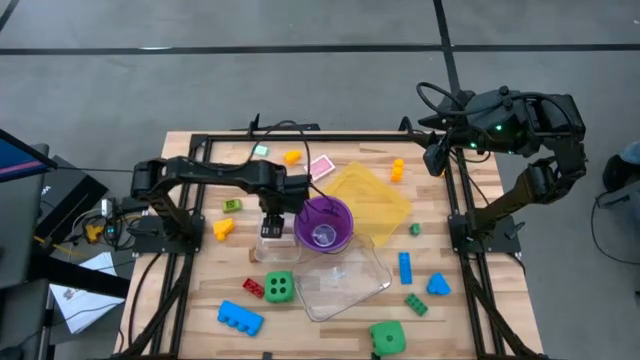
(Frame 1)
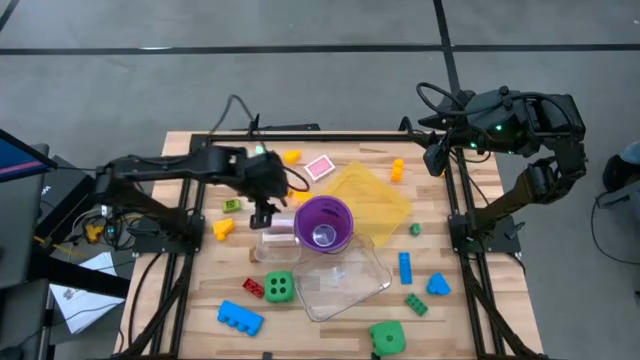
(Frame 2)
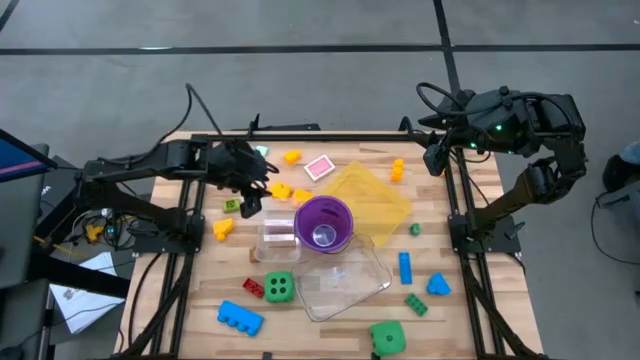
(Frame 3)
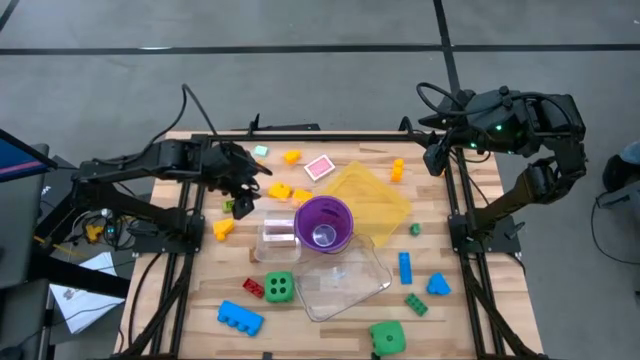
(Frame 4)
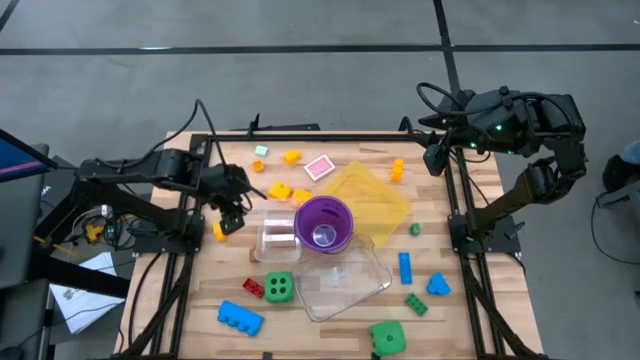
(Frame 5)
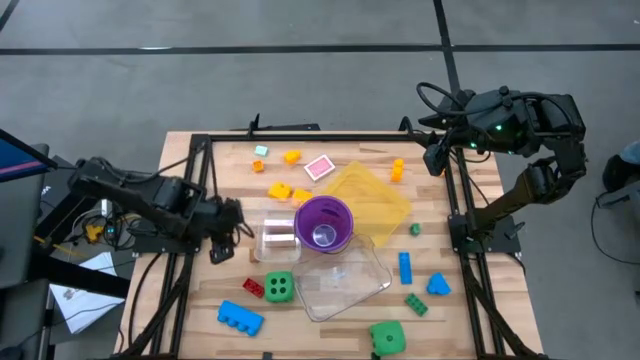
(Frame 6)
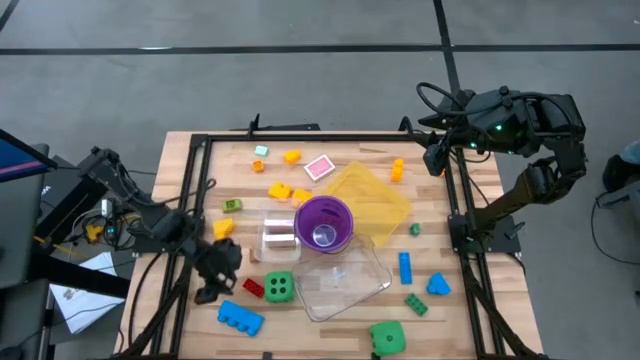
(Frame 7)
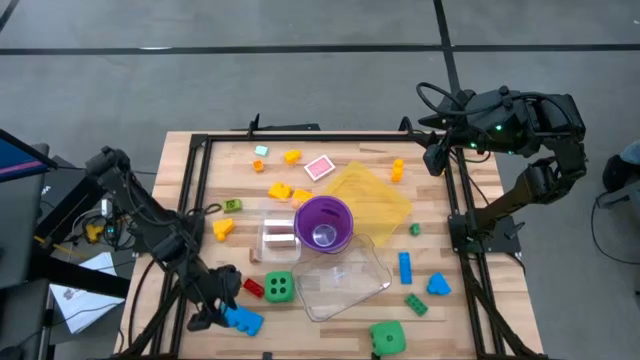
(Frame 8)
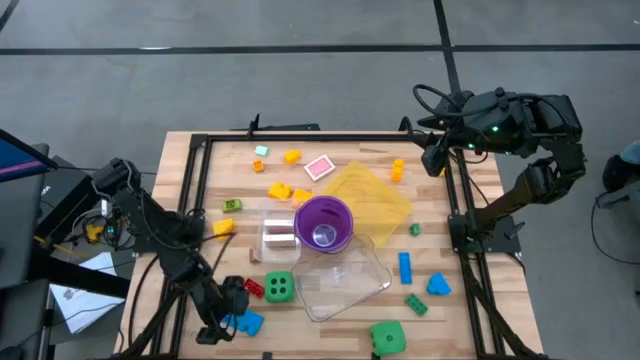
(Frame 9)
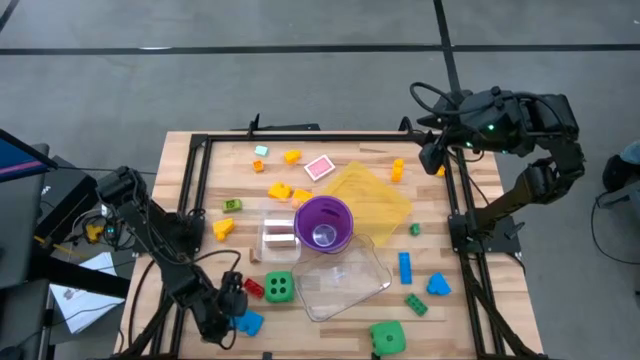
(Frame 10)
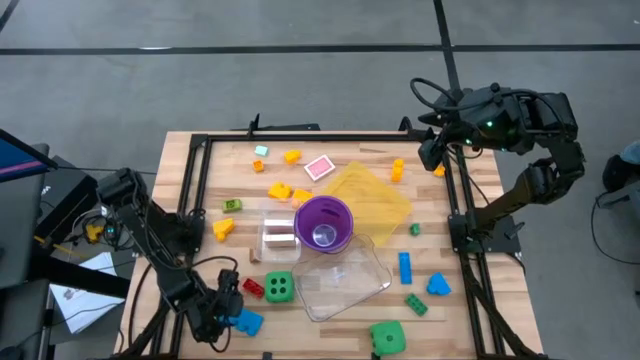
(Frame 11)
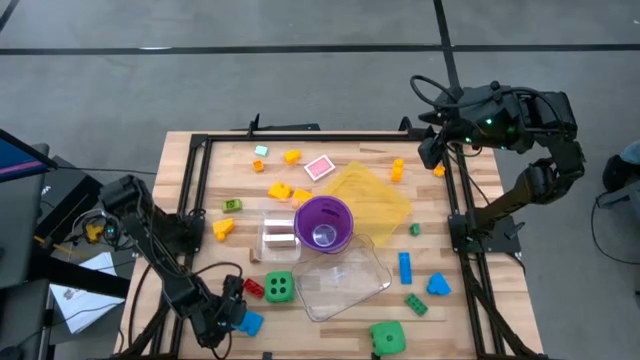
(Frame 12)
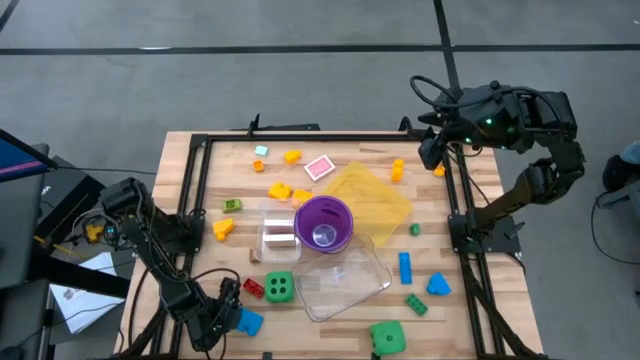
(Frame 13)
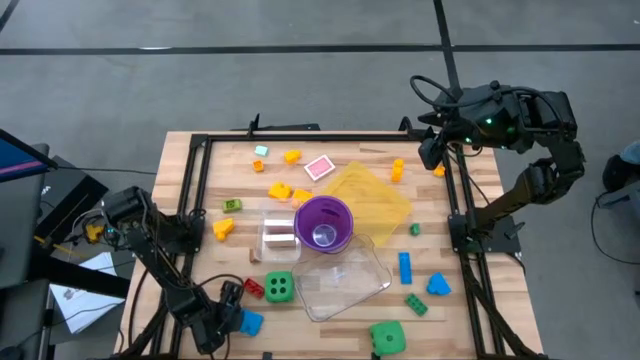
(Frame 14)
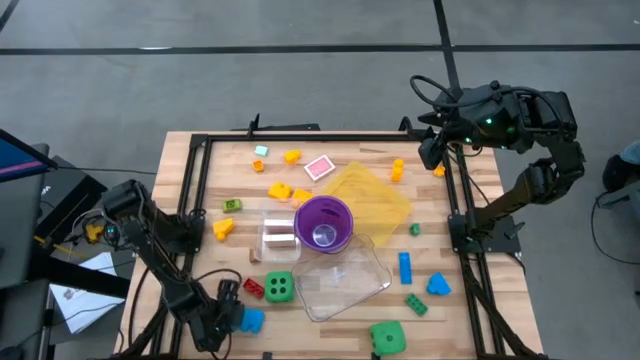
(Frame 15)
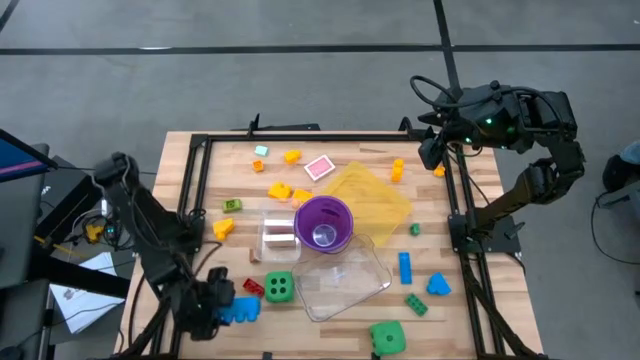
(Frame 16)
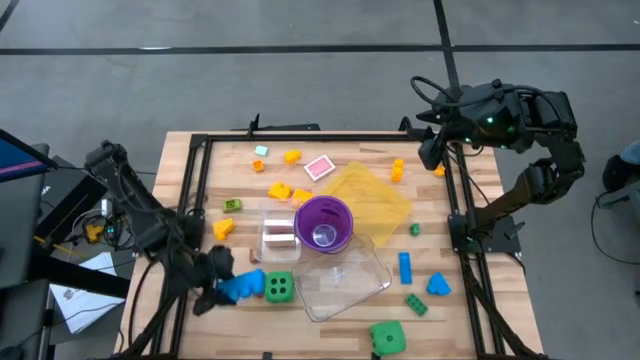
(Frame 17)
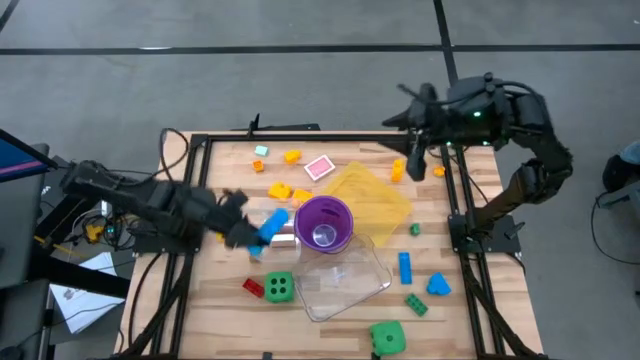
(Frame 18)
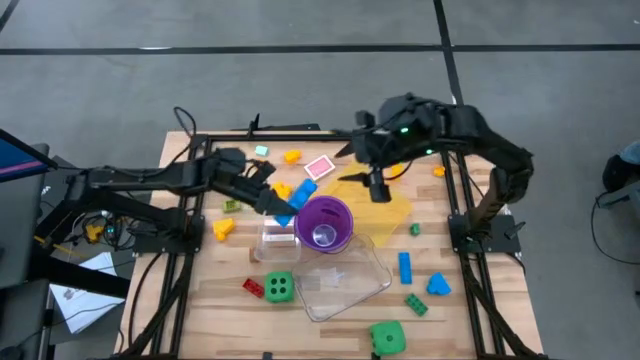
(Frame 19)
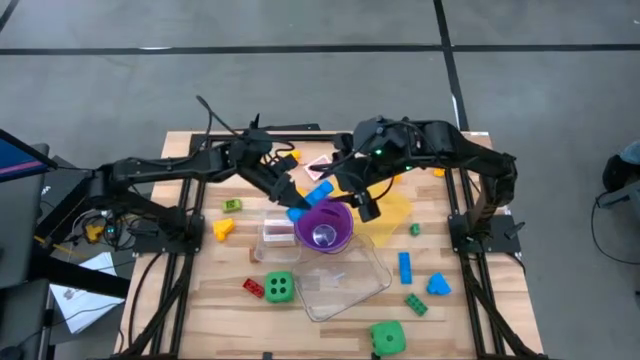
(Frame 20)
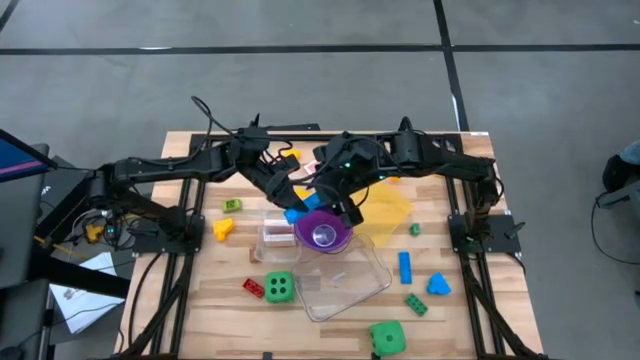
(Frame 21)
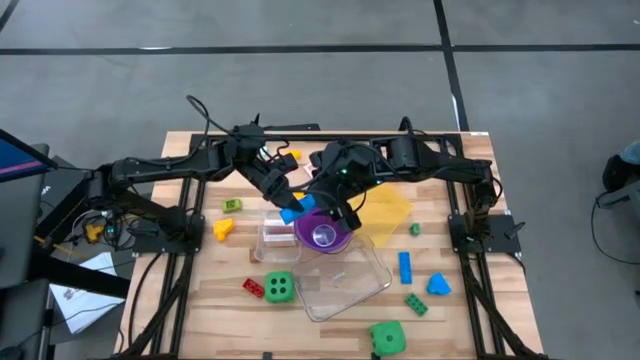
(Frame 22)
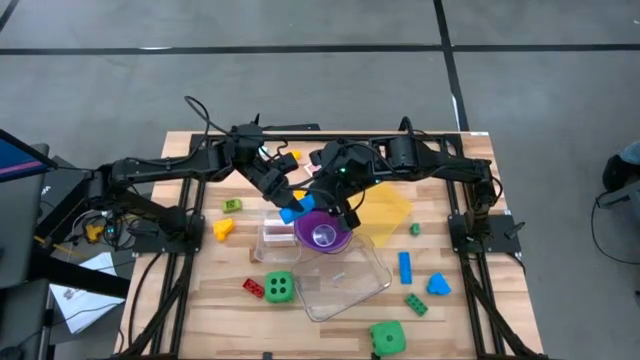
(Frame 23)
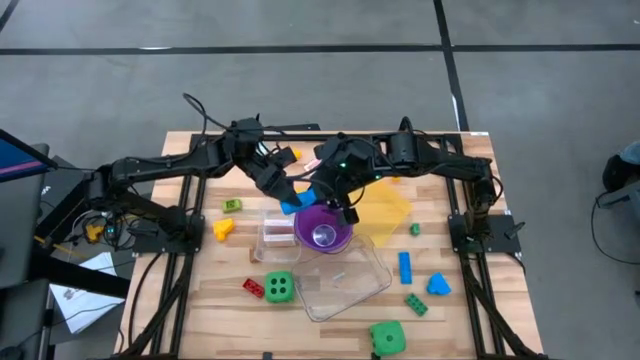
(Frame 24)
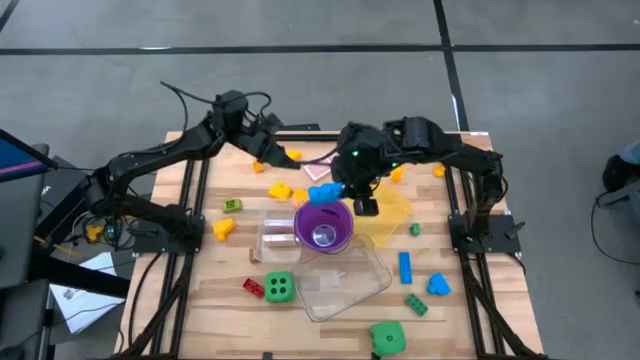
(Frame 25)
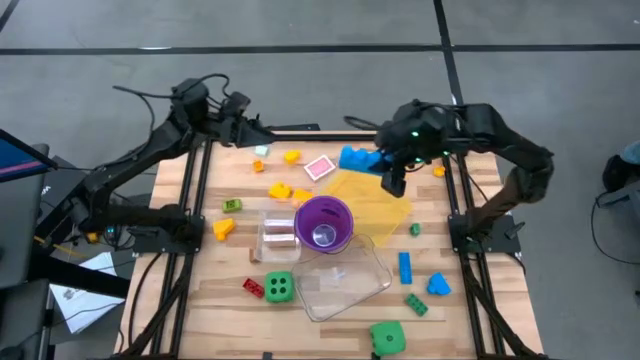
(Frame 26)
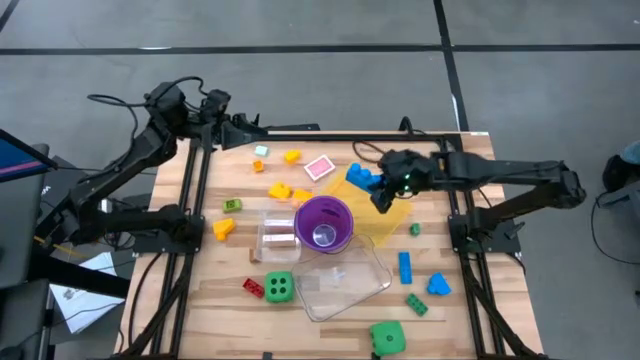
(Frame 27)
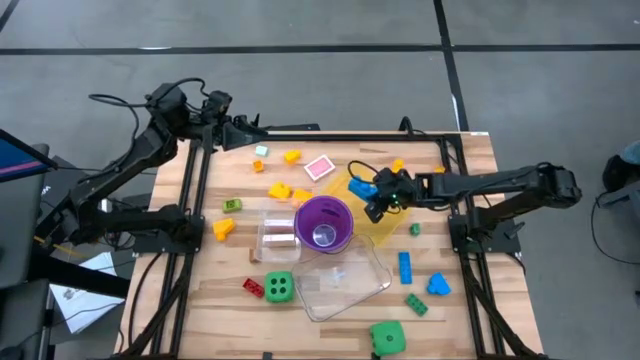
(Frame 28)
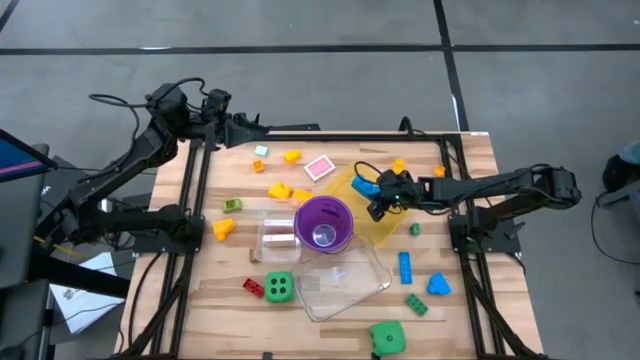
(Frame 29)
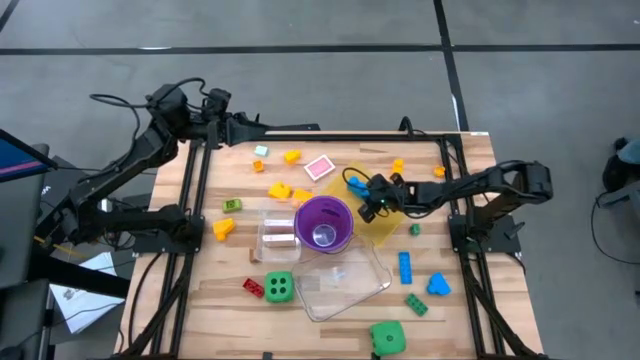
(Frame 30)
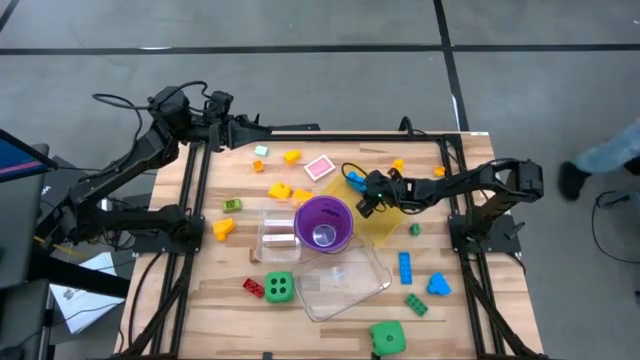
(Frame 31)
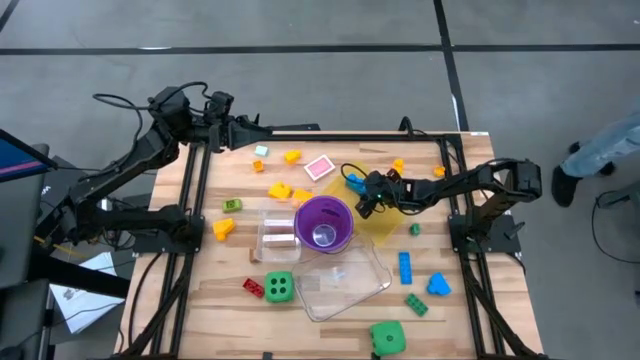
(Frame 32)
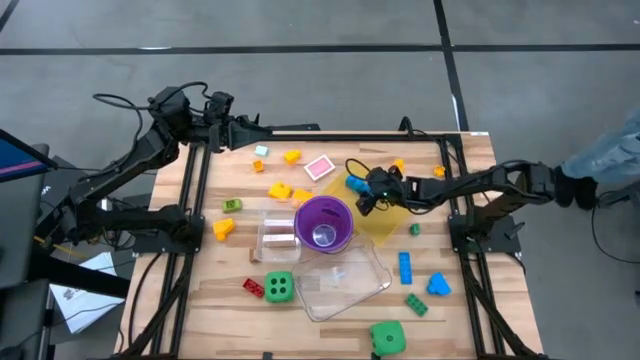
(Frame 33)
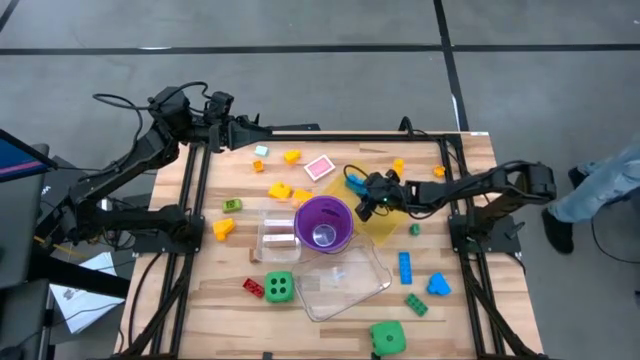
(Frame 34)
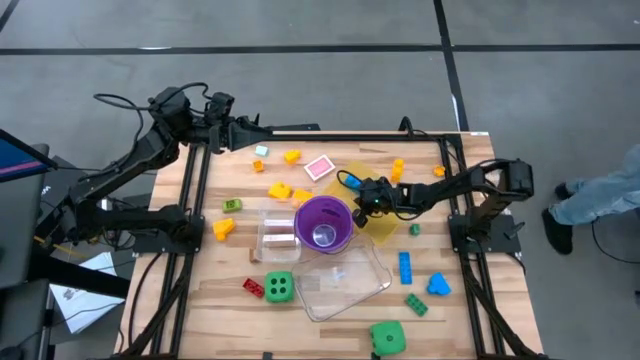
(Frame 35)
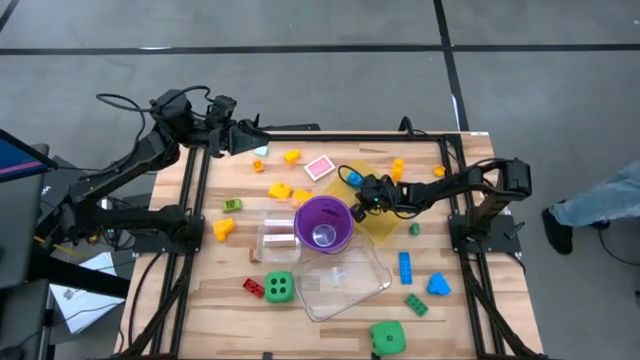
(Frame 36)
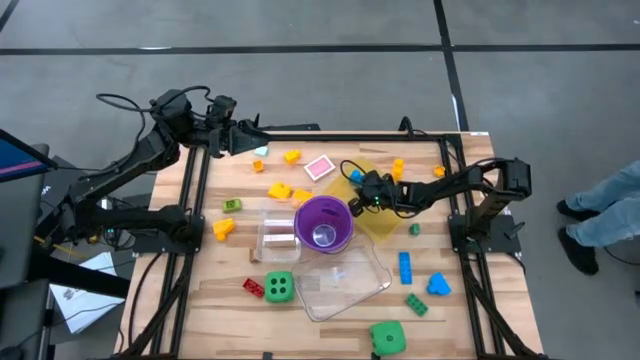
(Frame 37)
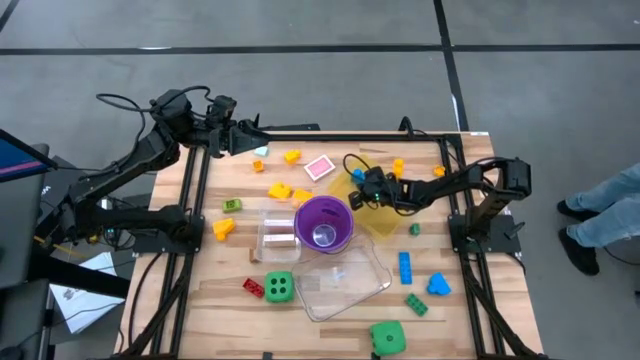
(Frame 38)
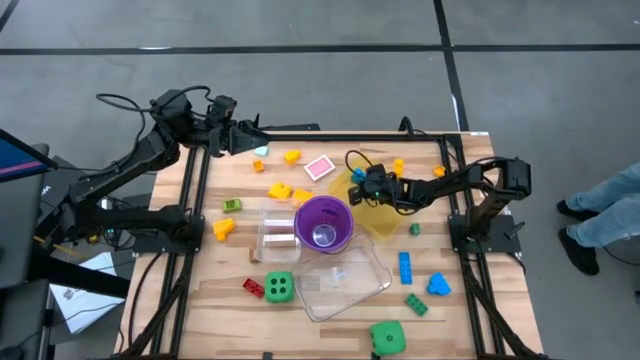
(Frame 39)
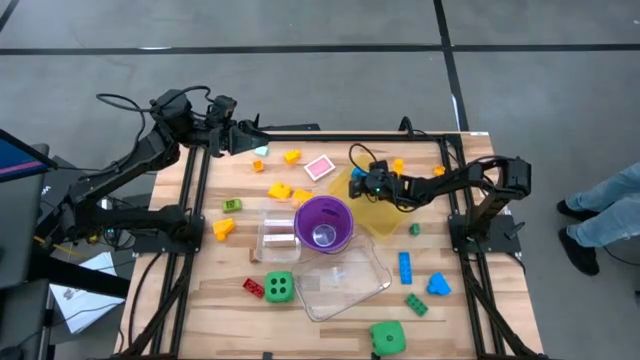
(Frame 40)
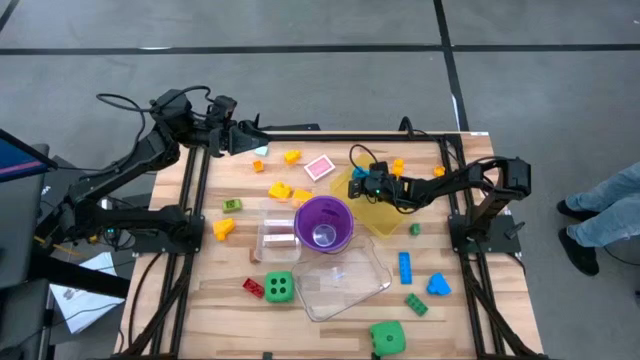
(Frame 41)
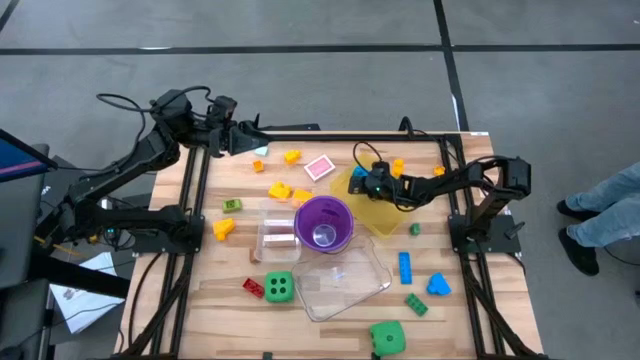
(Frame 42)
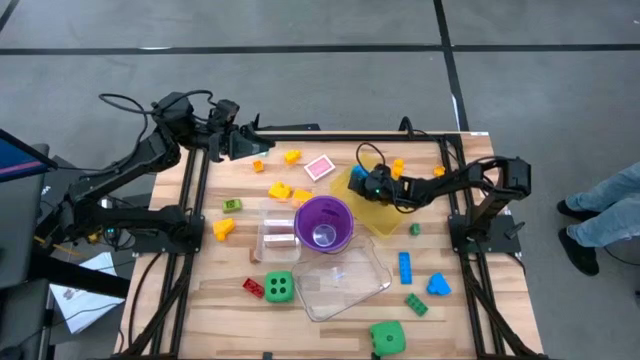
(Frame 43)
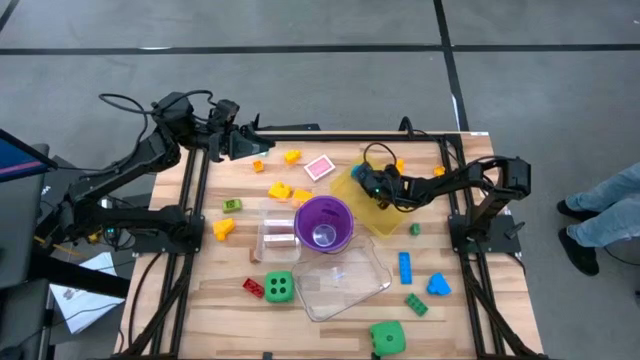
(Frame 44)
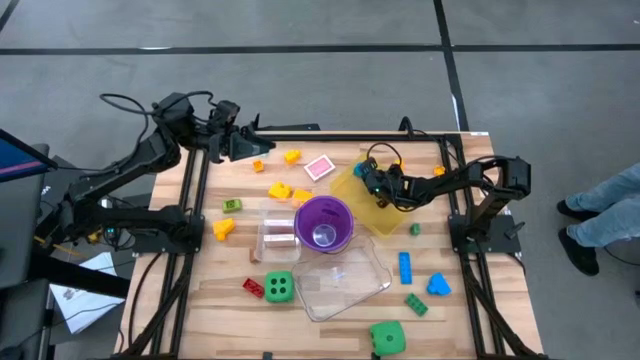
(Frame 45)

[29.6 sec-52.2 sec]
Task: Pick & Place Toys
Put the large blue game piece into the yellow bin
